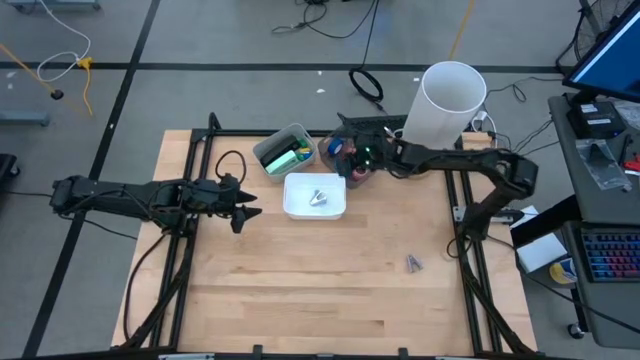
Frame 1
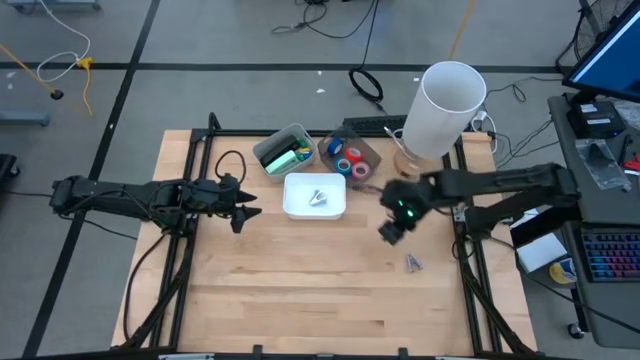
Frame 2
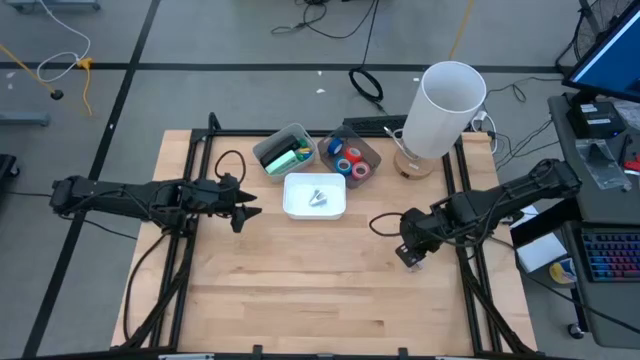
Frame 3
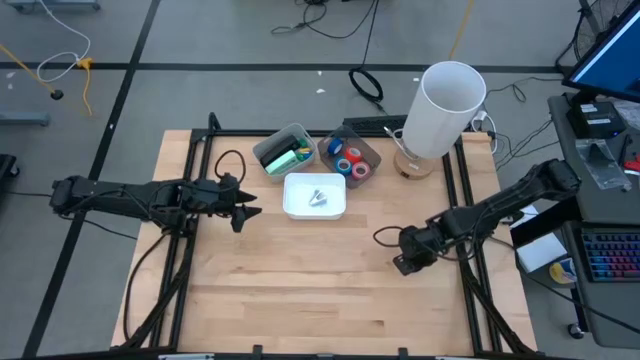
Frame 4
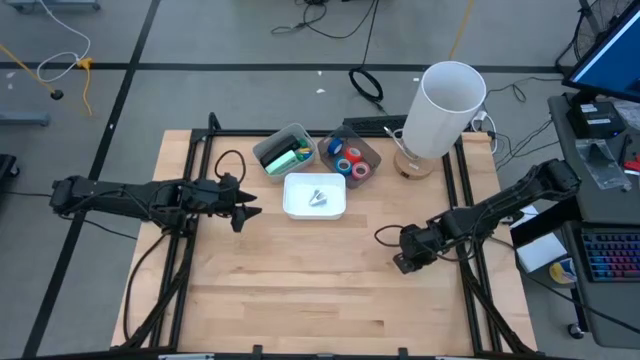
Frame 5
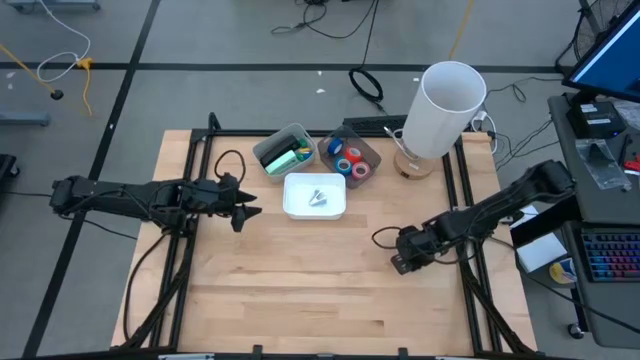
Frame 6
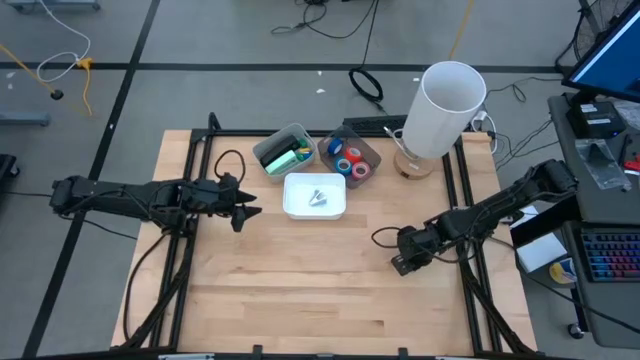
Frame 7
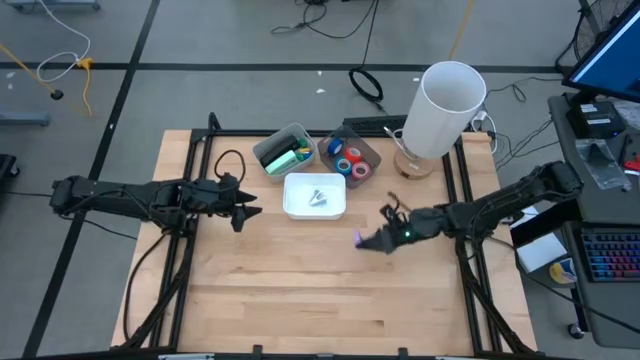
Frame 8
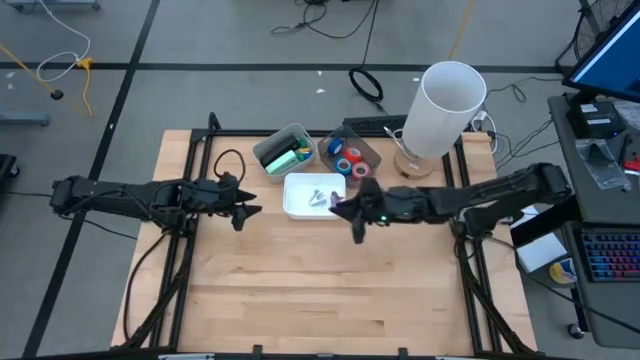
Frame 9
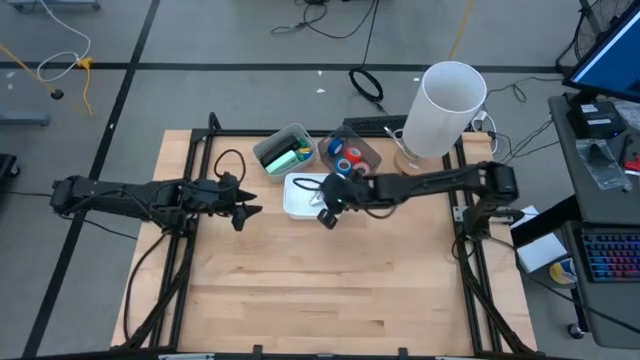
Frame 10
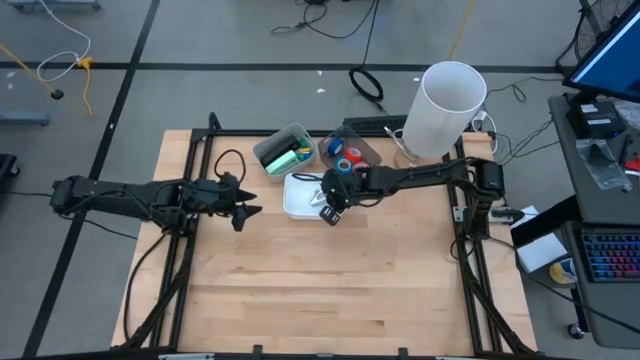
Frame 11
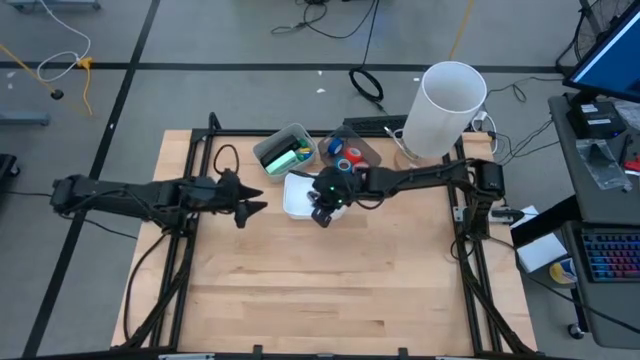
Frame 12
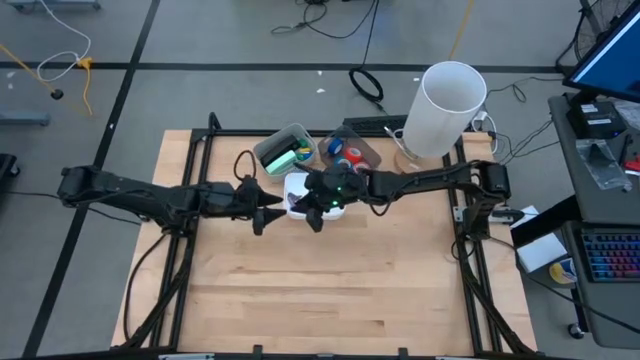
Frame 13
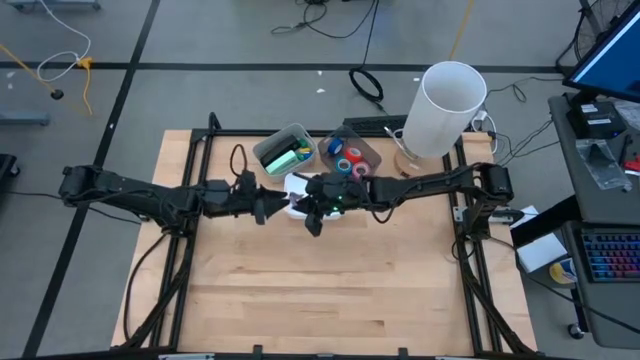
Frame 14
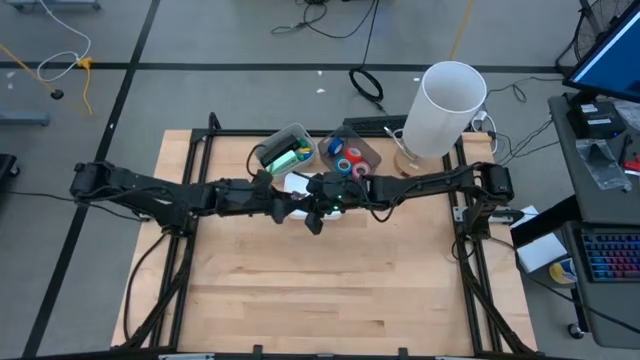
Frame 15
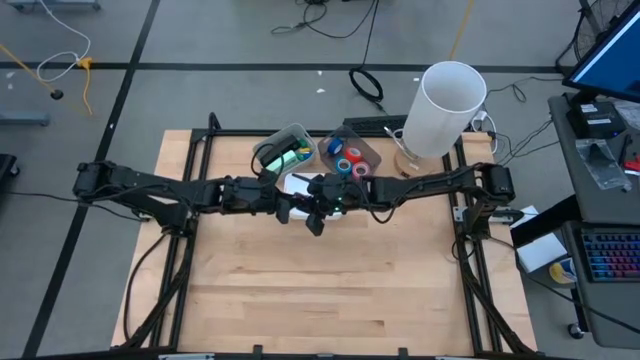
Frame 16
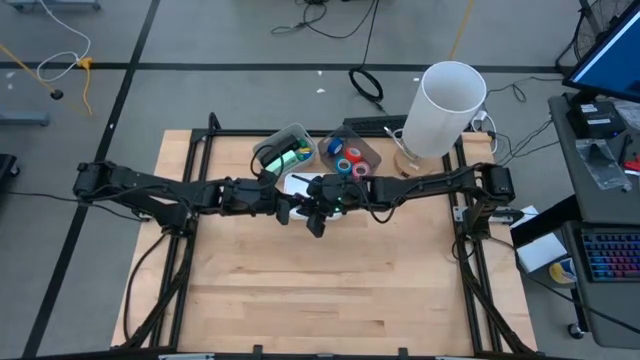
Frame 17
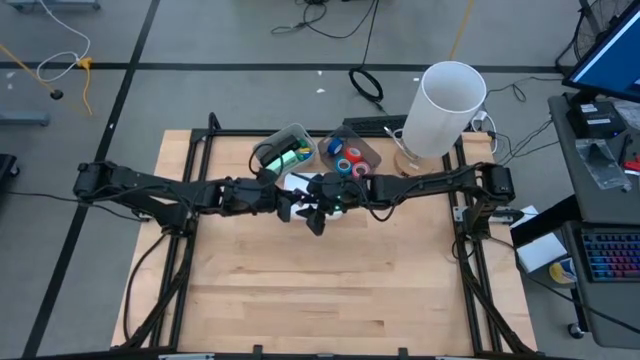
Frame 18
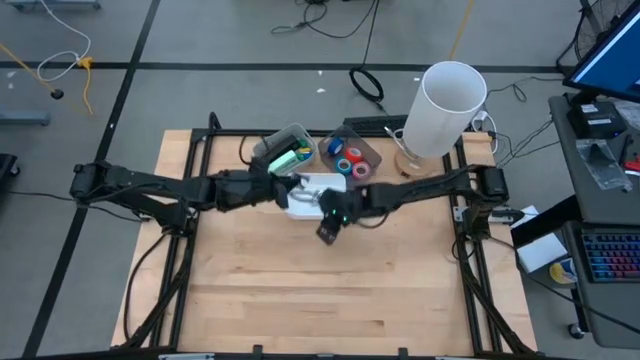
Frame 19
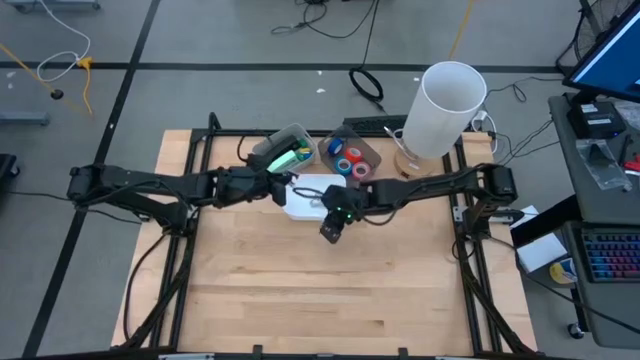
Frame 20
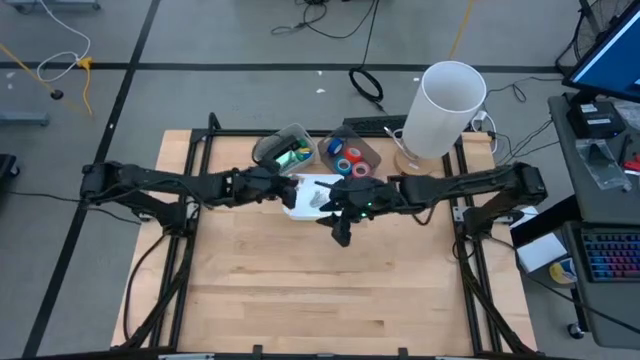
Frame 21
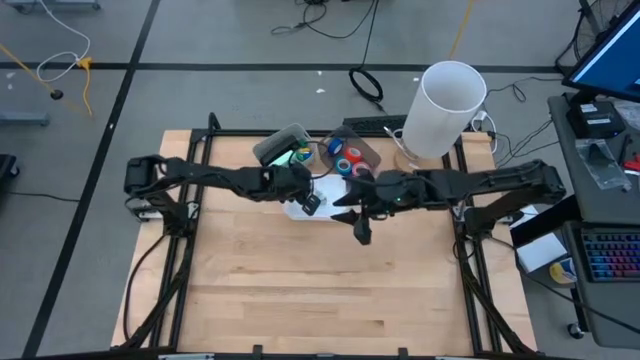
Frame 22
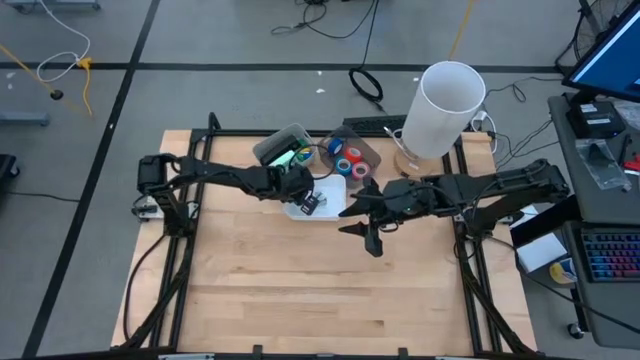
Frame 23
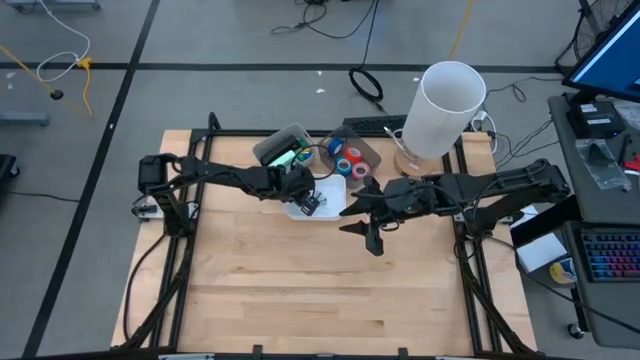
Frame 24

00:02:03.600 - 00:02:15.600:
Task: Pick and place Stapler, Stapler remover, tape
Put the purple staple remover into the white bin

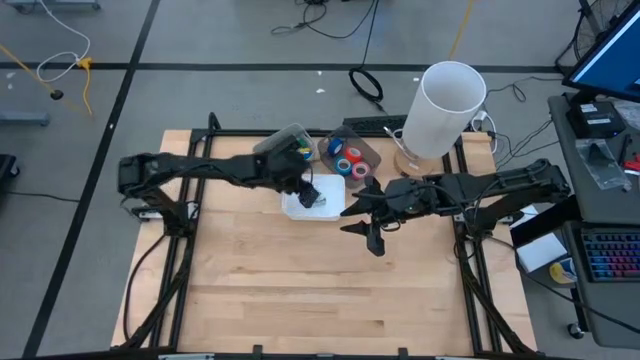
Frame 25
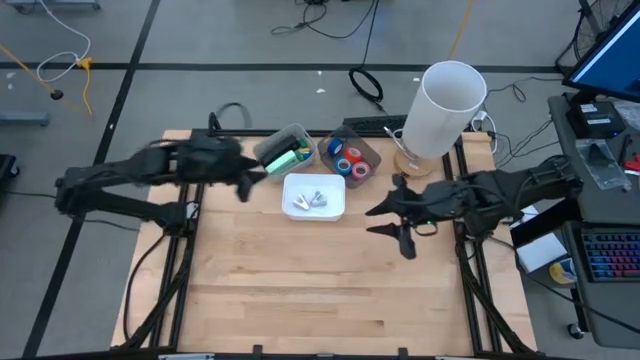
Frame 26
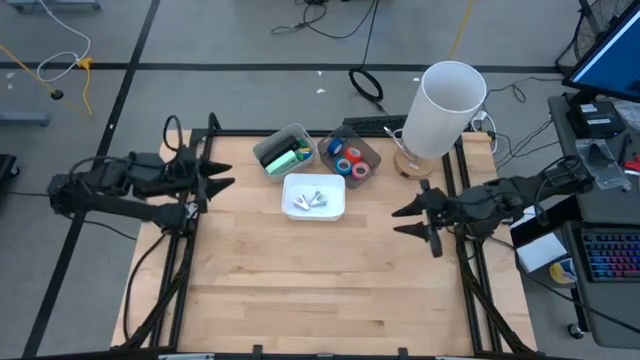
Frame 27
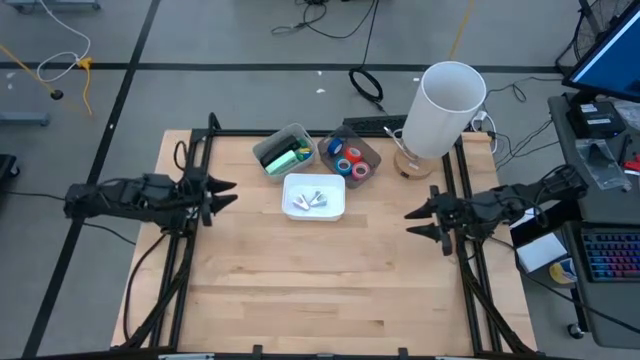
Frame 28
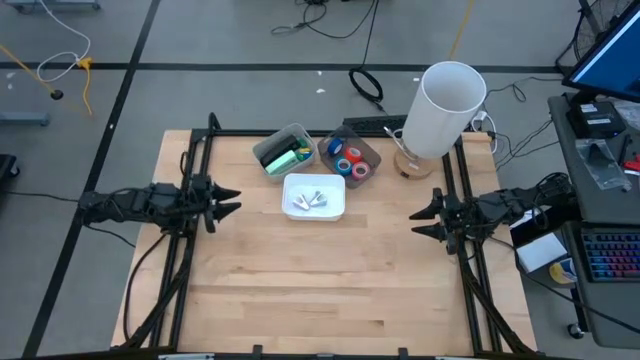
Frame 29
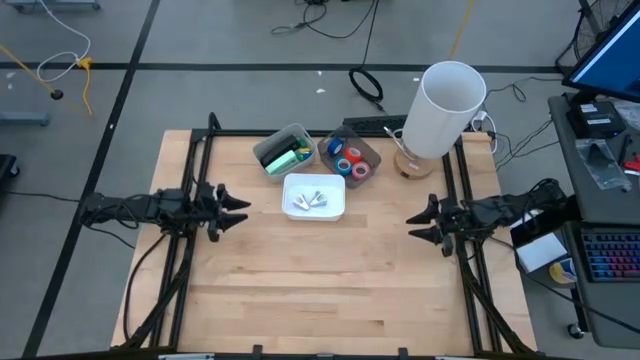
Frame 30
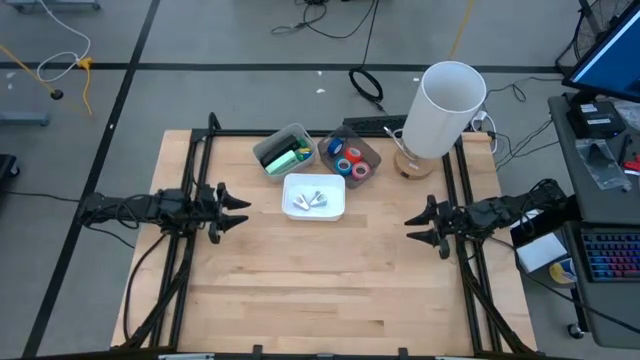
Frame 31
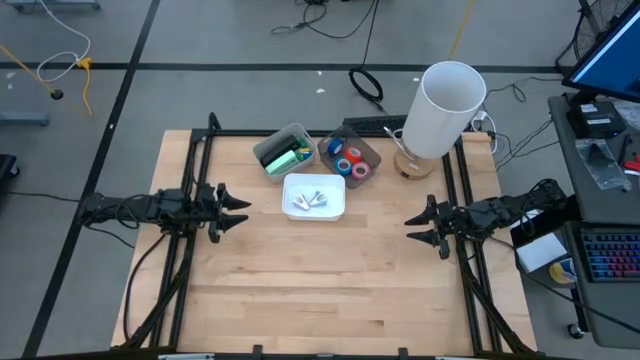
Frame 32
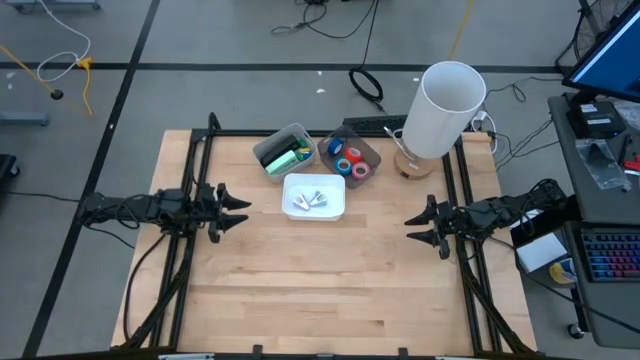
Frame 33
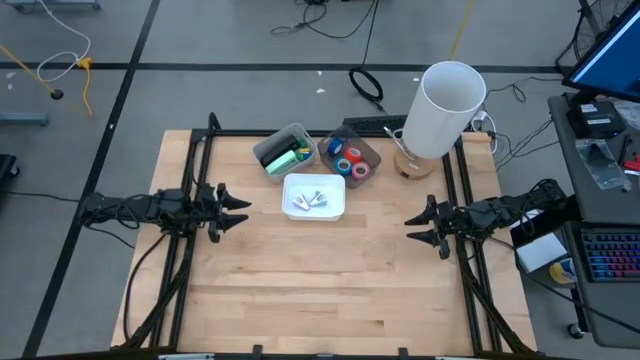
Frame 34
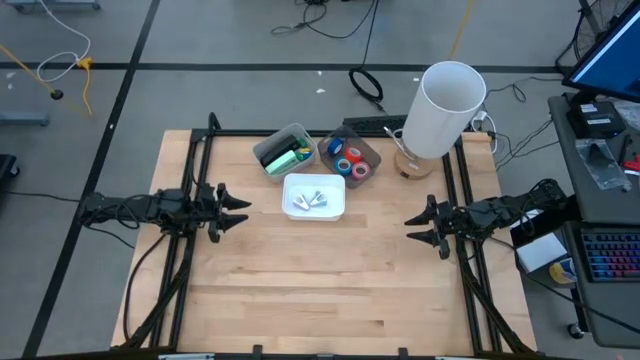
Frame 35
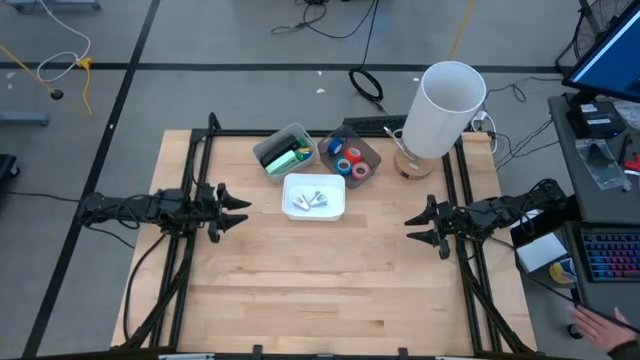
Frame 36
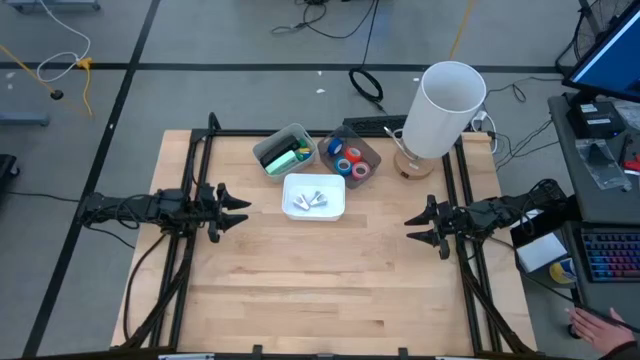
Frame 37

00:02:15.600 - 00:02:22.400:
Return to Home Position
